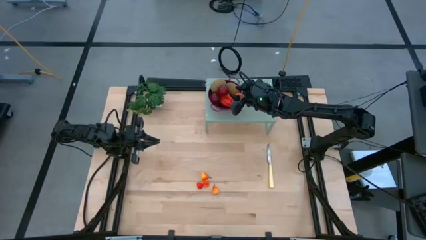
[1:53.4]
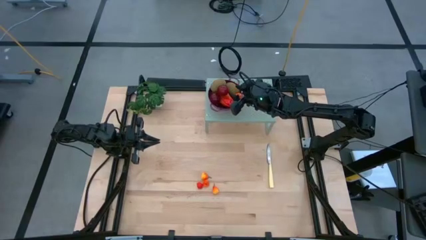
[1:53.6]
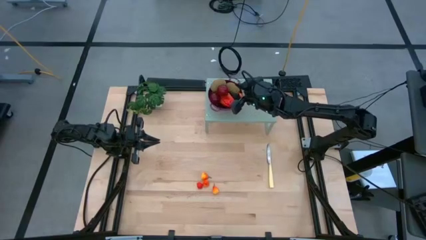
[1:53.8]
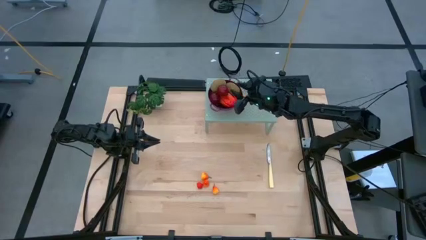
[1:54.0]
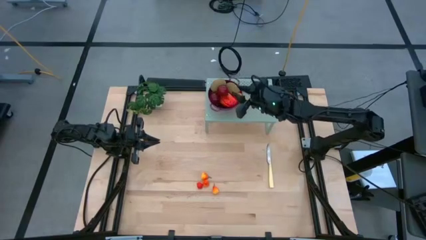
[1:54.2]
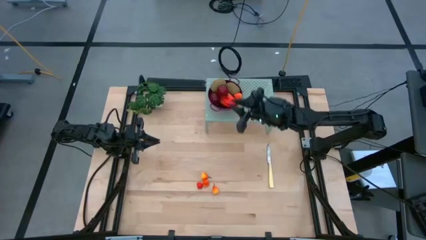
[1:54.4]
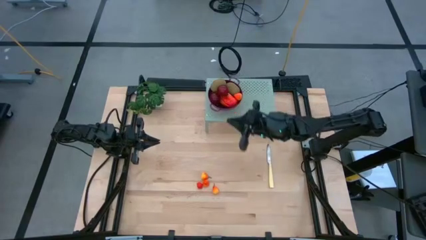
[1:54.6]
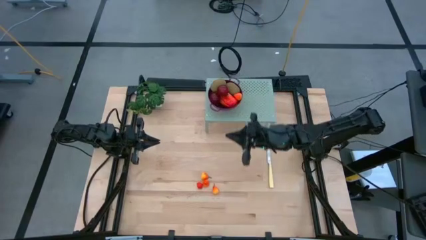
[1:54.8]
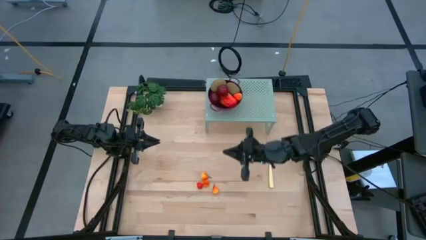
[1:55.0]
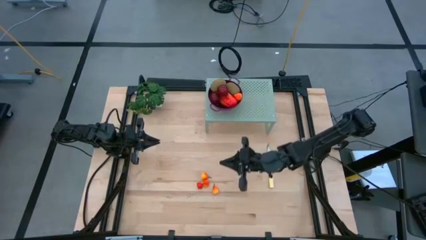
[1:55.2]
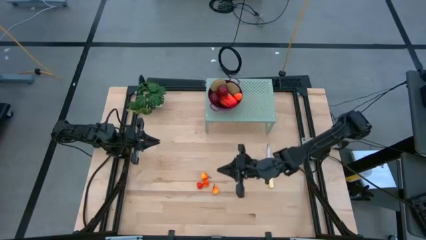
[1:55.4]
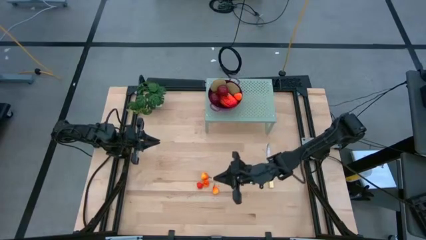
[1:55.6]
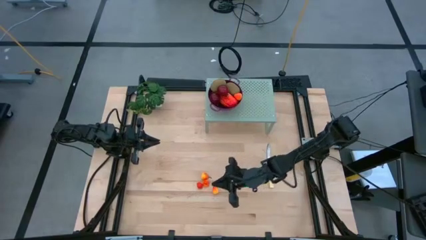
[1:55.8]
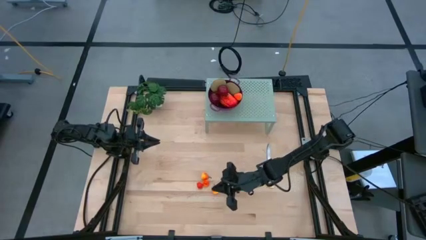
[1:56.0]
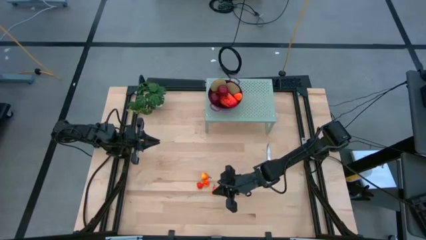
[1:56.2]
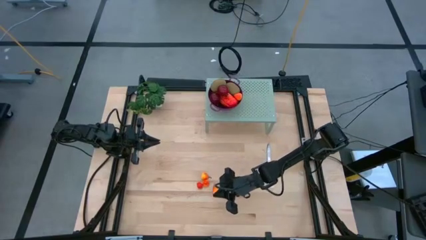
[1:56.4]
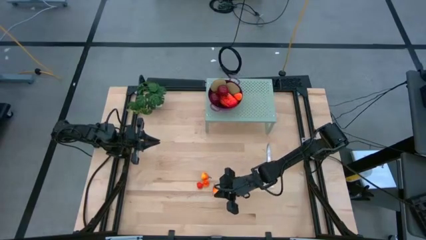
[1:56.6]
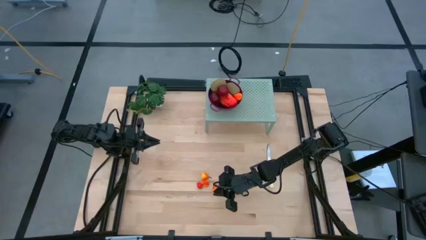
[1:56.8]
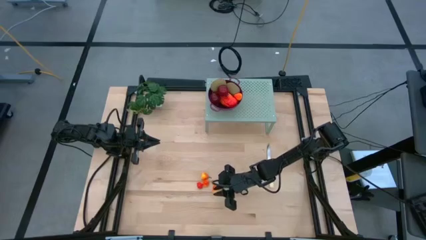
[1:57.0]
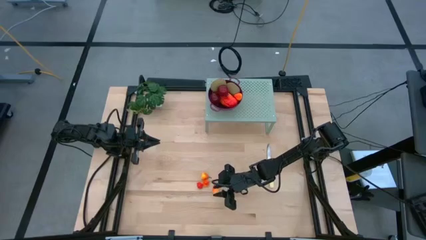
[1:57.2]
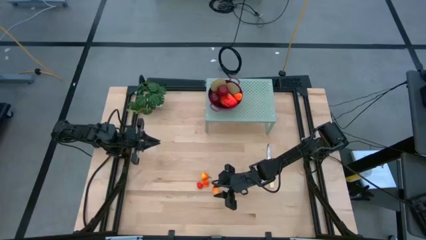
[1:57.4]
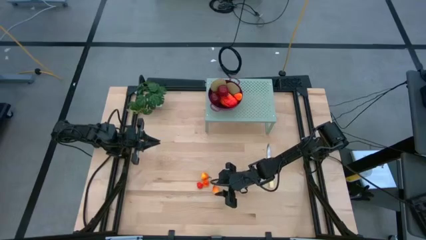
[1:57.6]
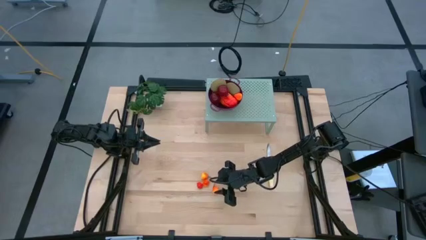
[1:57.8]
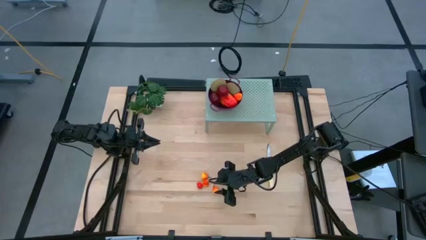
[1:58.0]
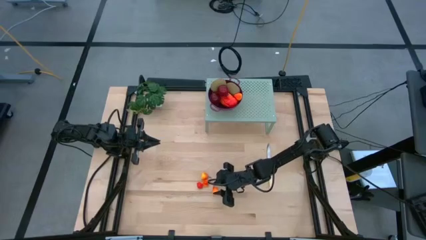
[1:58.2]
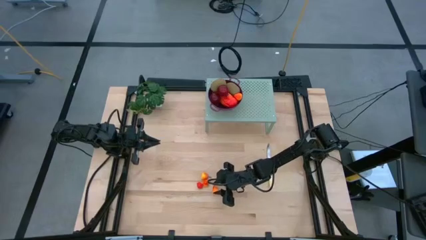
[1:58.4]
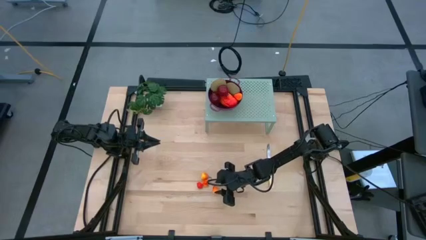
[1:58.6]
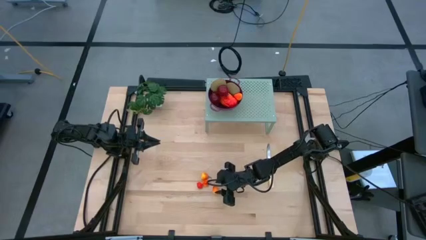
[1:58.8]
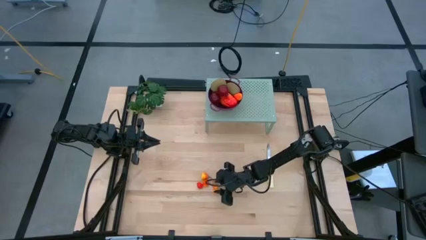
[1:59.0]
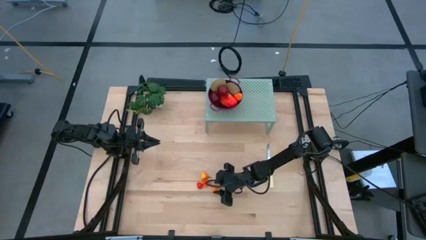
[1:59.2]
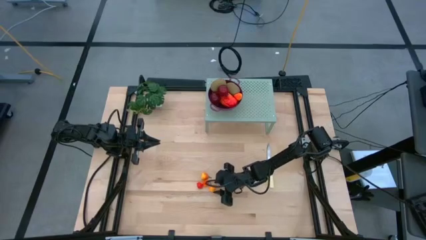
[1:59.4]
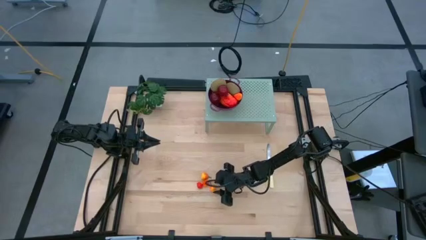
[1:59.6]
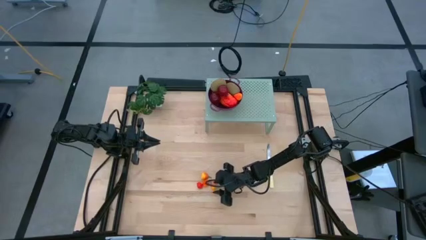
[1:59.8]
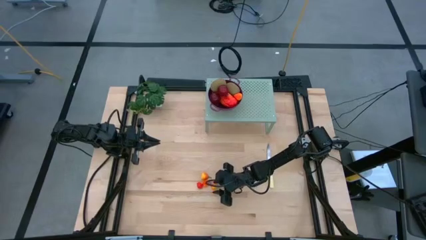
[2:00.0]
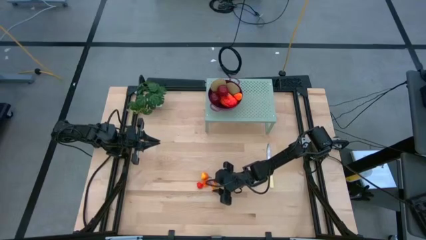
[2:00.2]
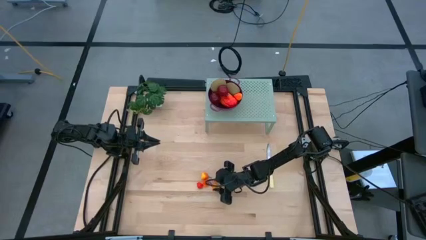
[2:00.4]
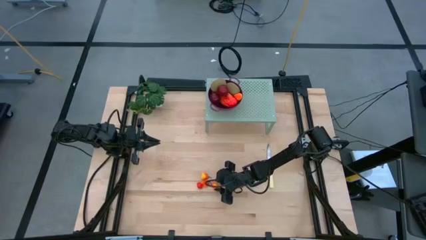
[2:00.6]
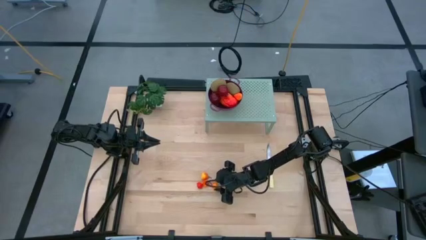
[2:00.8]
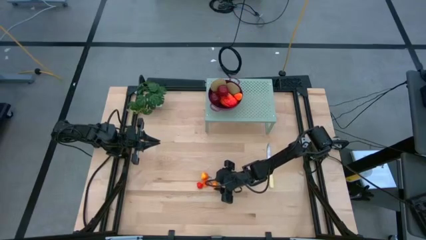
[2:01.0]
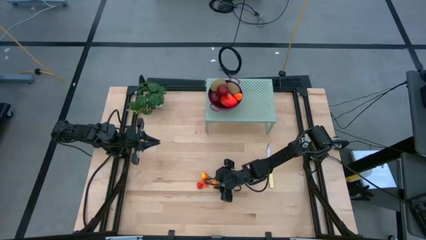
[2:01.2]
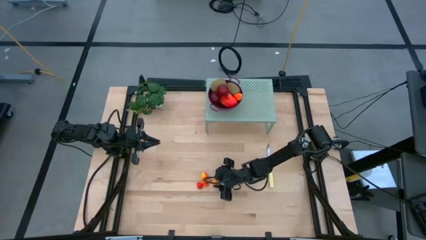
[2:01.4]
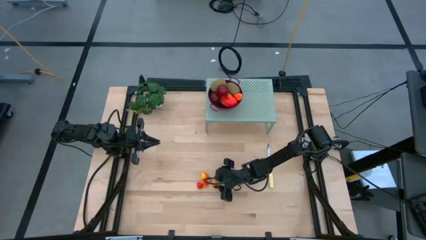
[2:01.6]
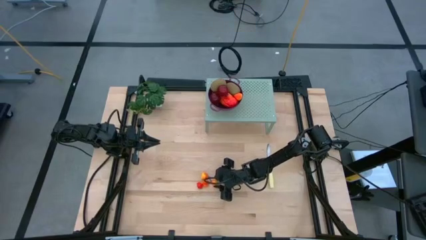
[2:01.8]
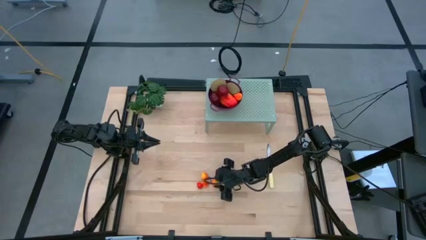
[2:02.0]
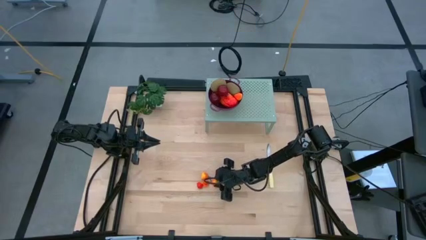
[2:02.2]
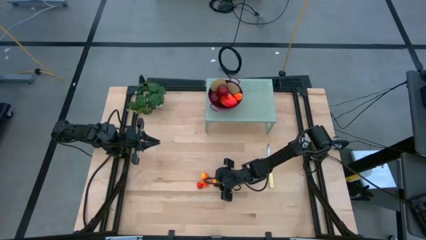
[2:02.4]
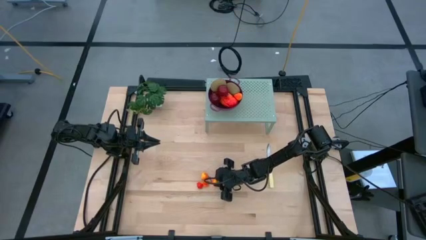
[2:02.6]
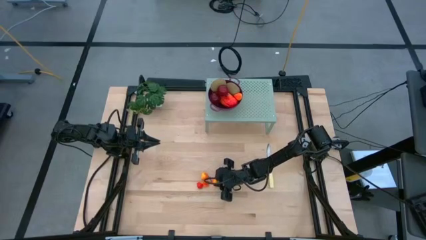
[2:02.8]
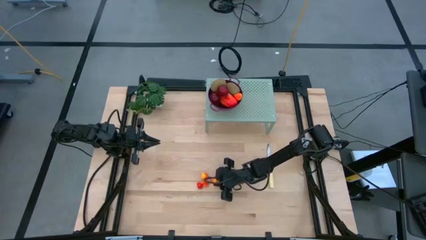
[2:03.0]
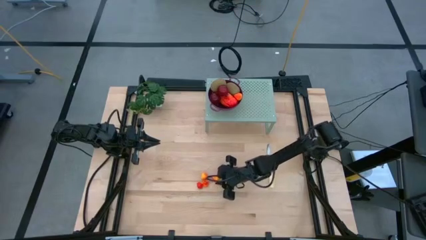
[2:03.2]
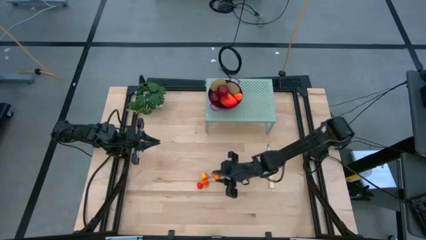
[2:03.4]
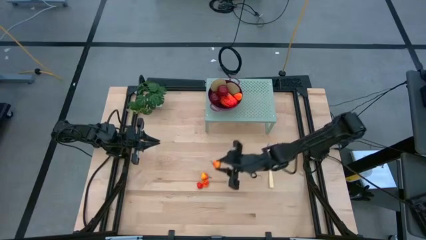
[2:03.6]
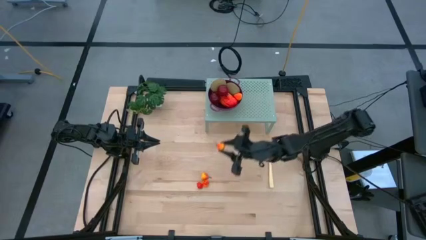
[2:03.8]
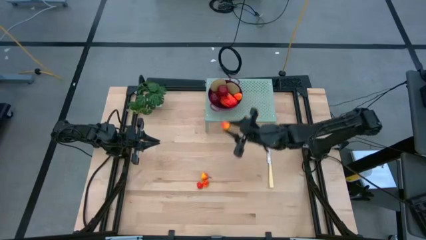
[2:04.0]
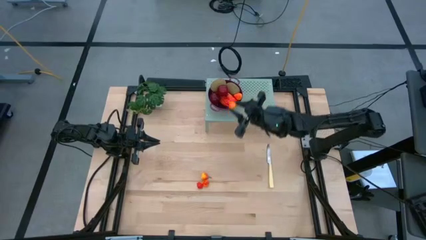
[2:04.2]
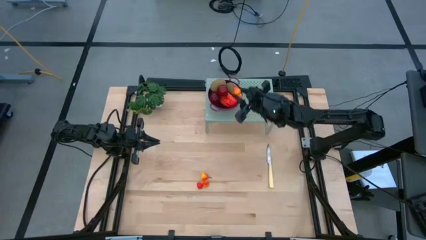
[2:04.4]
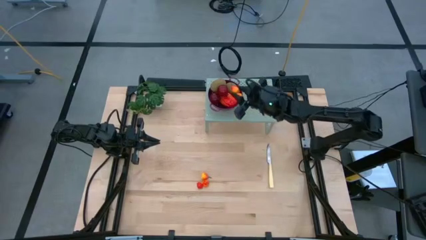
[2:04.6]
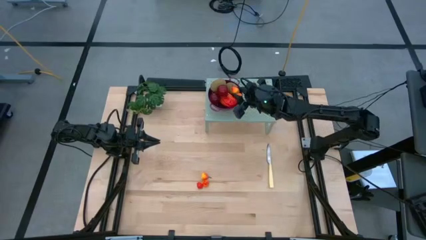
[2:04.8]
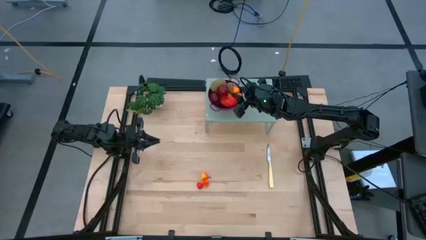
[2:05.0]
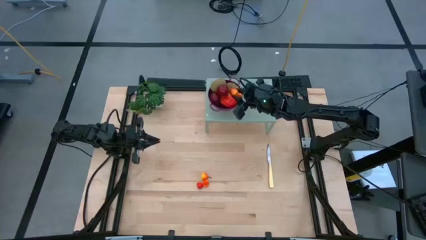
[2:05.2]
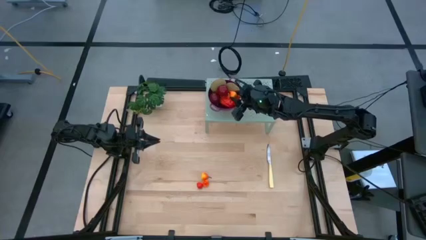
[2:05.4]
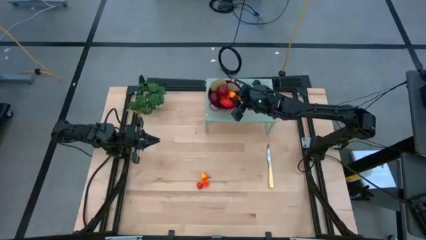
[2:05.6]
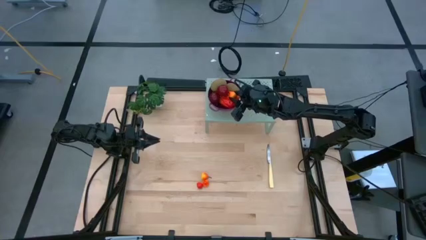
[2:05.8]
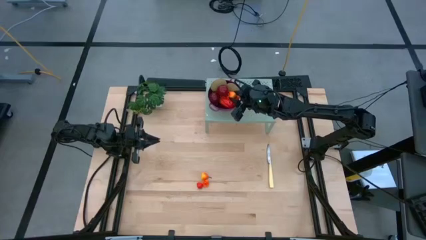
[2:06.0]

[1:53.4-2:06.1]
Task: Pick & Place Fruit
Put the pear into the dark red colander on the shelf
